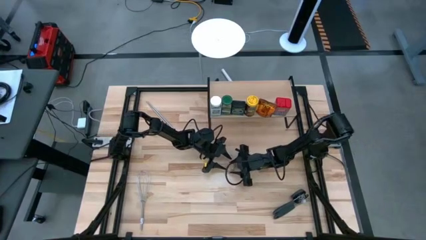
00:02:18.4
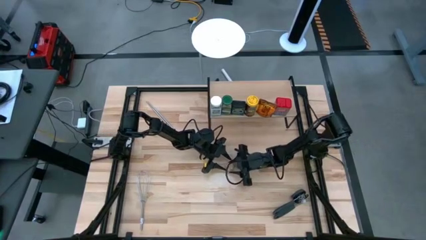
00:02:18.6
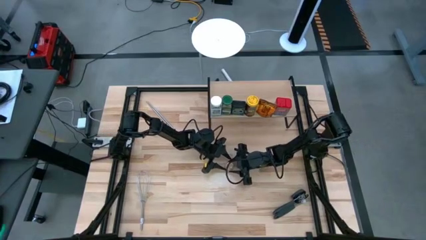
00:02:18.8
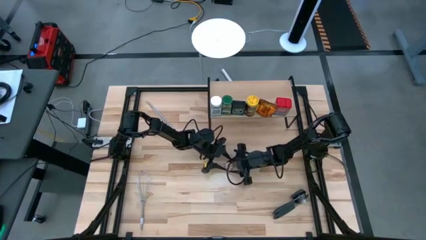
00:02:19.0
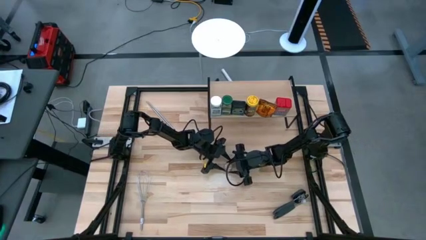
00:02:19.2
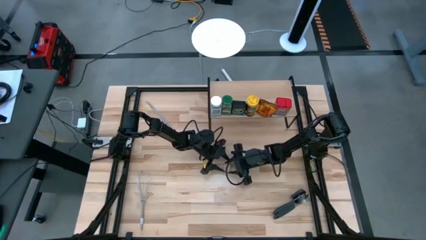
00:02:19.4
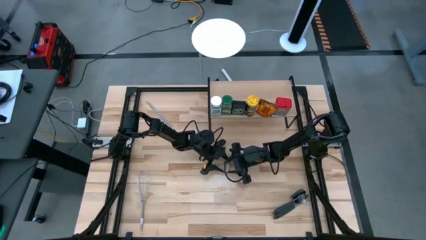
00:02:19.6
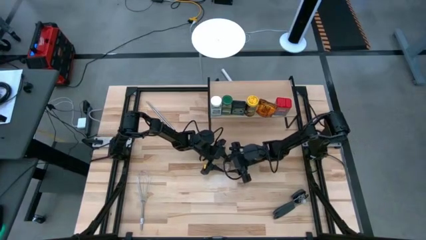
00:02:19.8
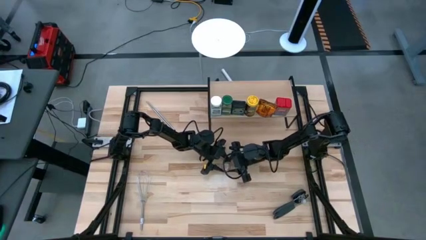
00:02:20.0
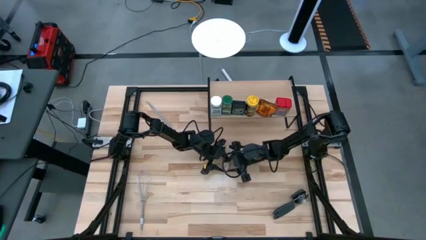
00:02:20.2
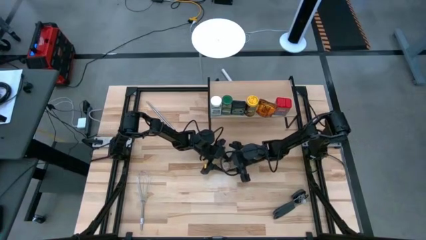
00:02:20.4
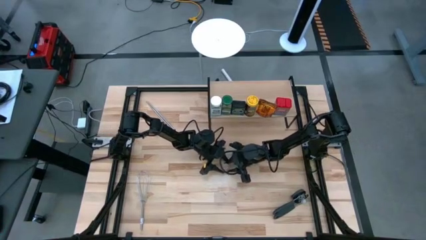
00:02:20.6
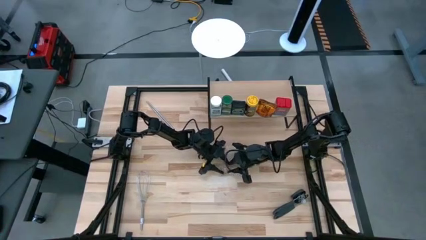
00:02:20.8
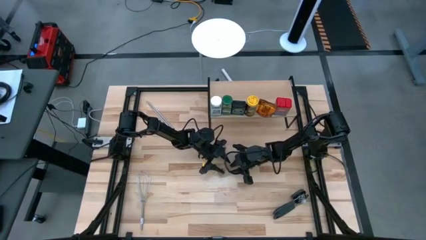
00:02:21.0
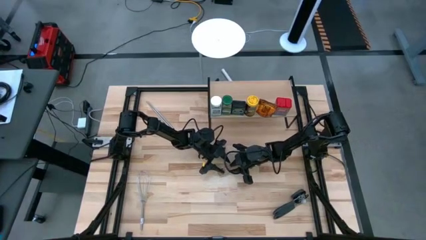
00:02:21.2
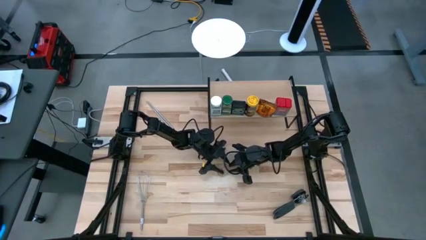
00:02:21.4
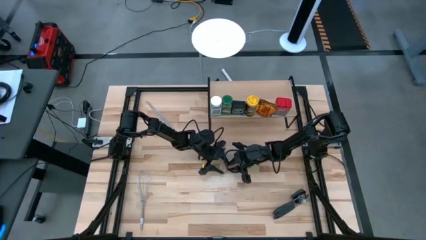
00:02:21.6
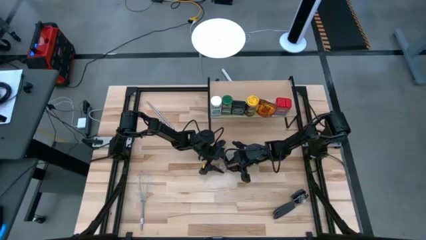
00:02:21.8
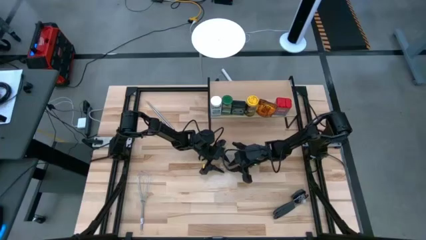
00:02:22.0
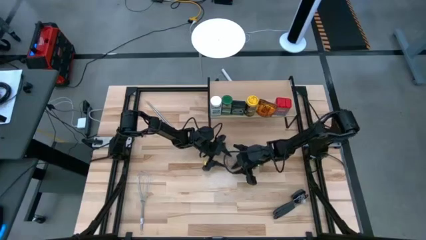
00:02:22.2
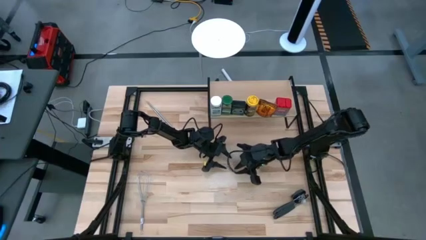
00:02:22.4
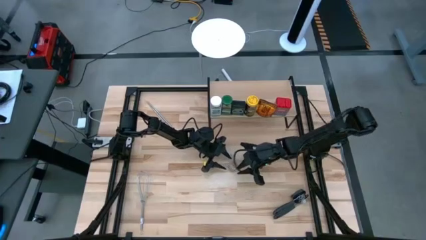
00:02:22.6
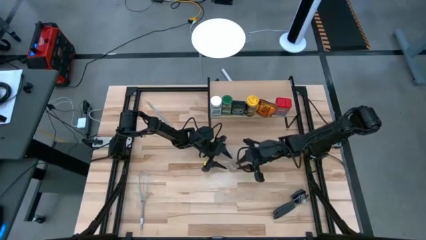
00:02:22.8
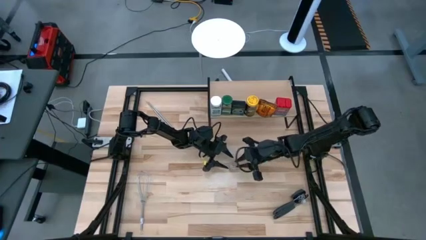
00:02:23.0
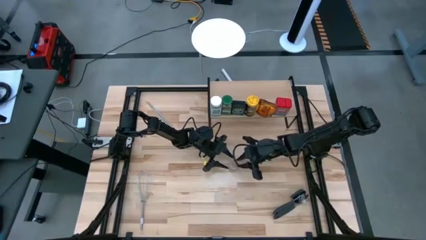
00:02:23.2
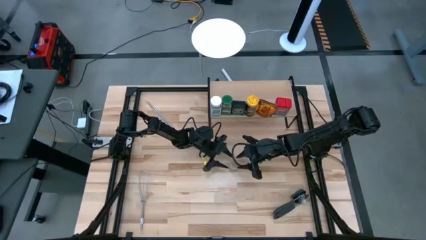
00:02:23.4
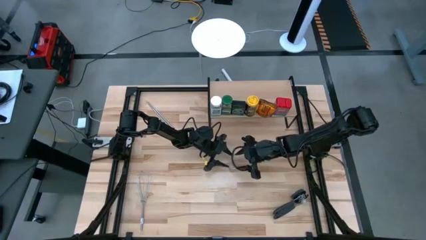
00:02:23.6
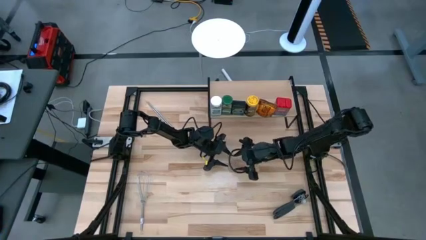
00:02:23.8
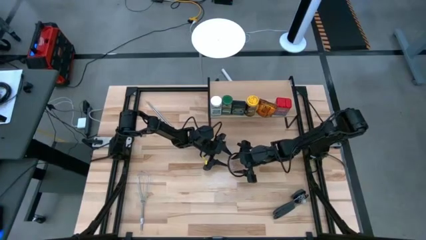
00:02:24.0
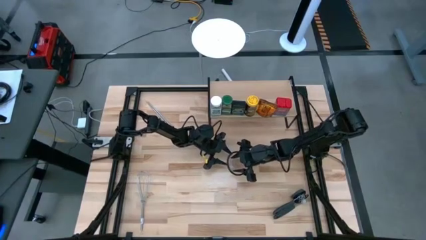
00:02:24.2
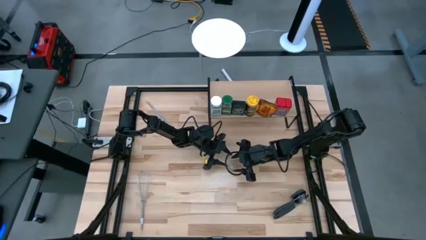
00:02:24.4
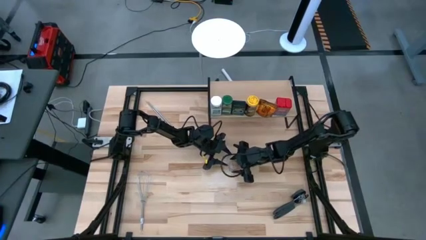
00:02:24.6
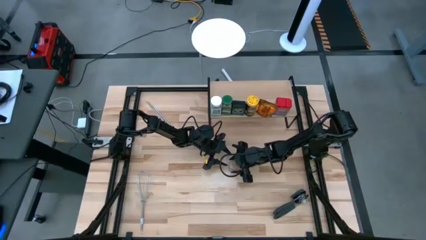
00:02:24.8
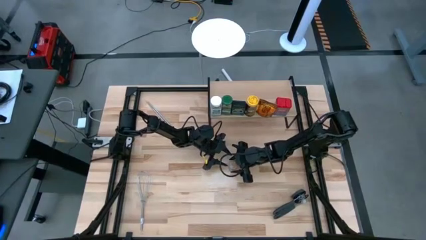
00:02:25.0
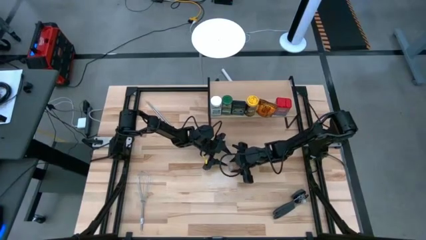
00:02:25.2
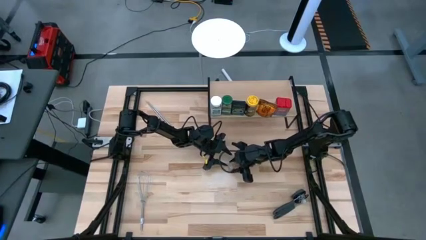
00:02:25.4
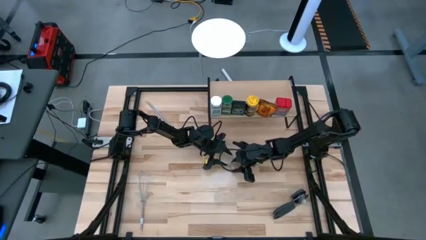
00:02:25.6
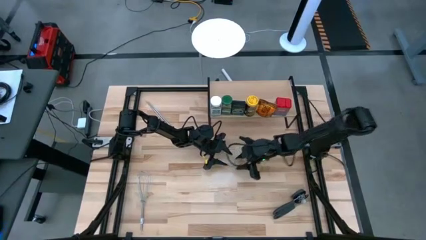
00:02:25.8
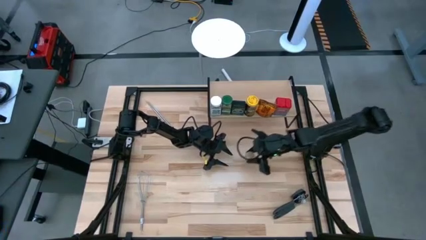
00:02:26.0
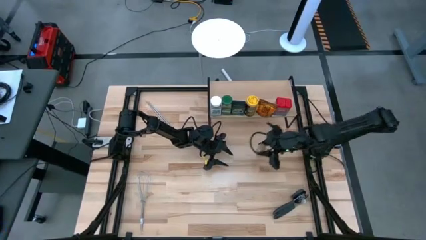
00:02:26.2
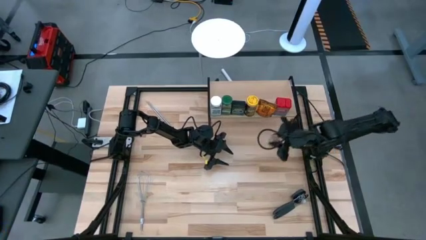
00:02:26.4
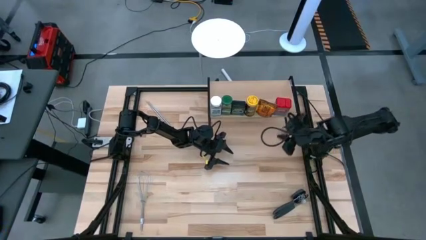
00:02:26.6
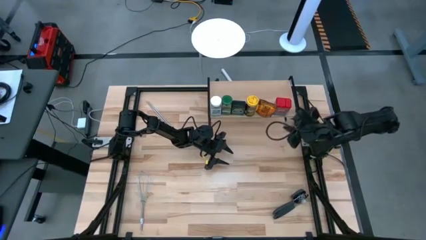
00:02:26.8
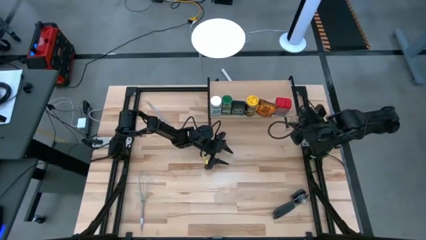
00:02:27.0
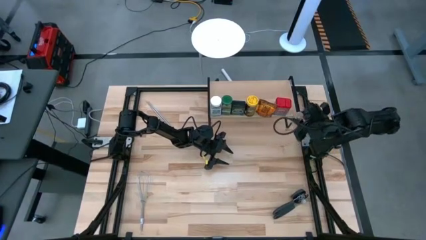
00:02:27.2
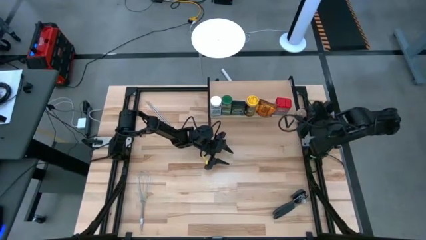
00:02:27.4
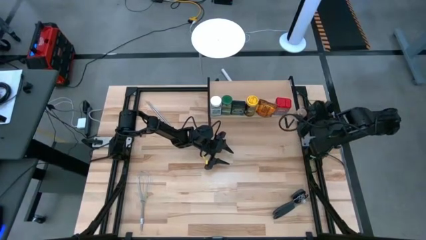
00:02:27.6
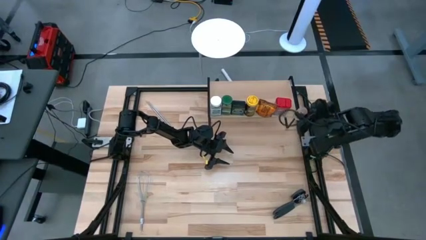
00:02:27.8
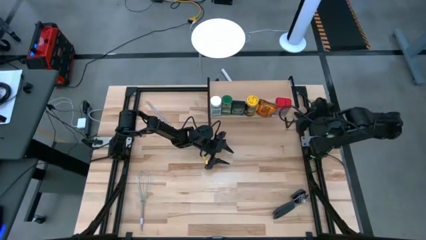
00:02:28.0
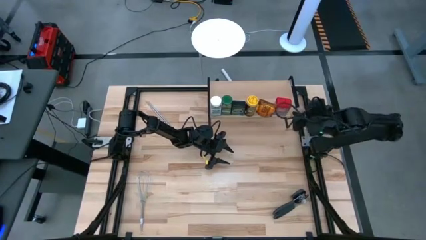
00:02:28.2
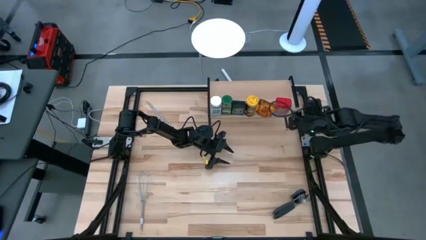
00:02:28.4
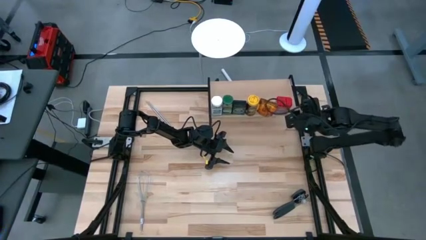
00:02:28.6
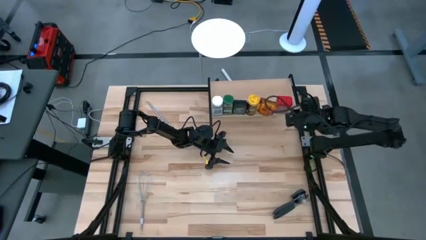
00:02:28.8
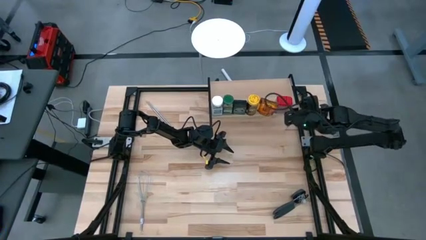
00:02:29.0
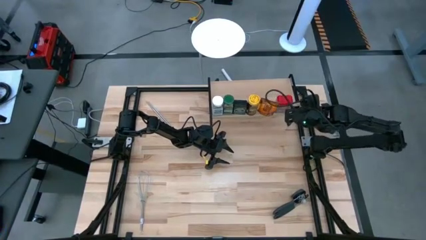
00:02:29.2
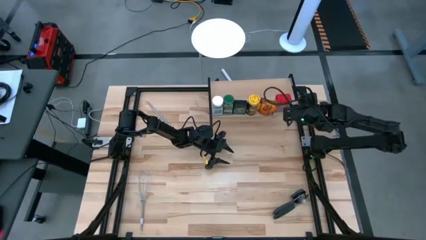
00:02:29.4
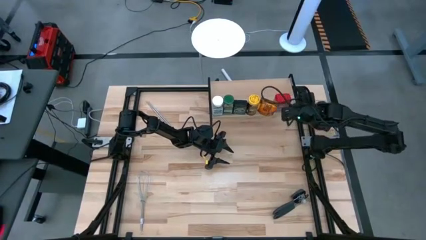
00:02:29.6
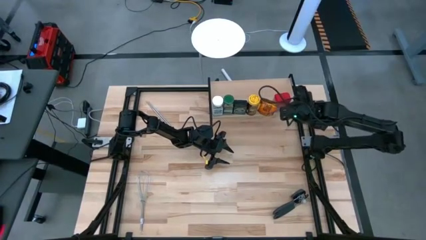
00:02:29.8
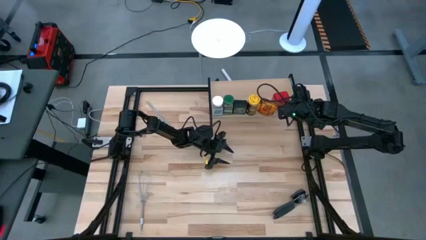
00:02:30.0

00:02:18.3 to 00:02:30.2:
Task: Shelf spices
Put the transparent seasoning bottle on the shelf

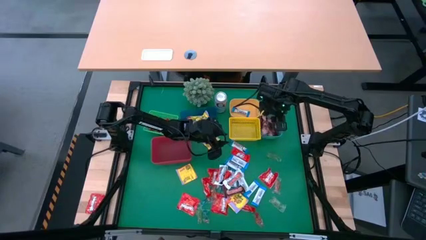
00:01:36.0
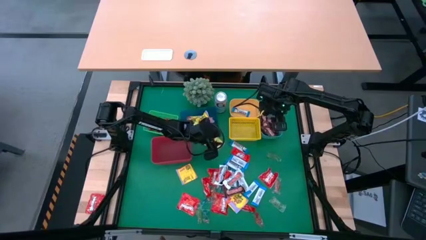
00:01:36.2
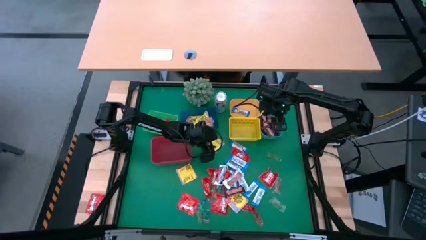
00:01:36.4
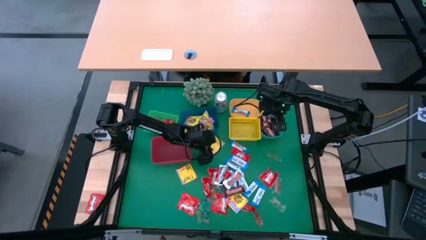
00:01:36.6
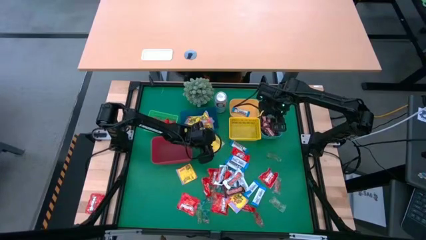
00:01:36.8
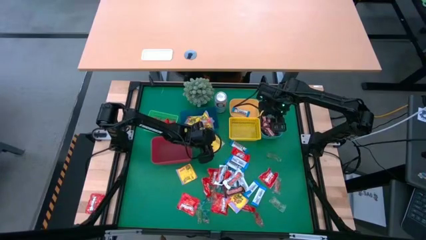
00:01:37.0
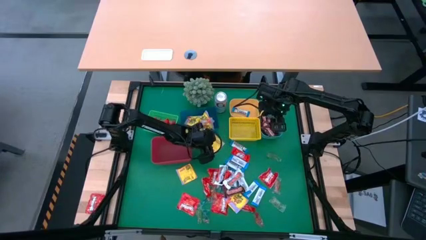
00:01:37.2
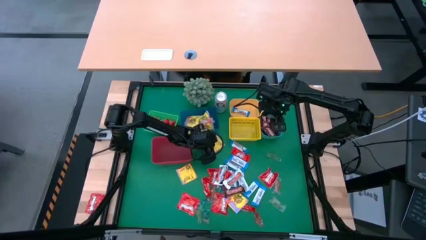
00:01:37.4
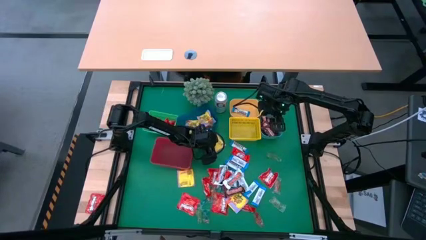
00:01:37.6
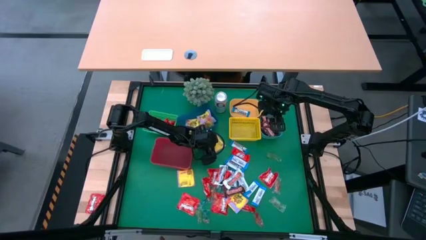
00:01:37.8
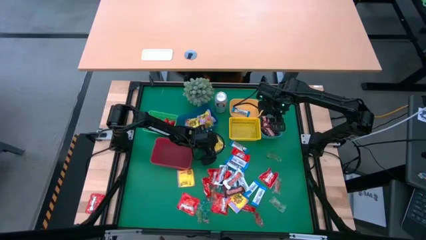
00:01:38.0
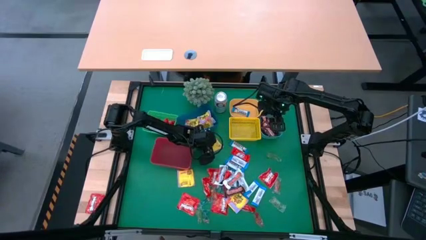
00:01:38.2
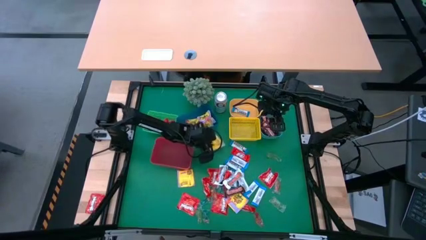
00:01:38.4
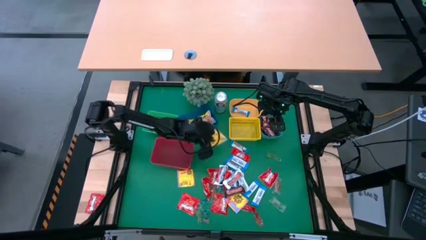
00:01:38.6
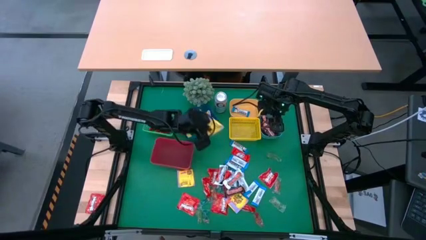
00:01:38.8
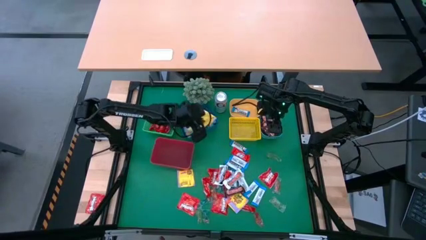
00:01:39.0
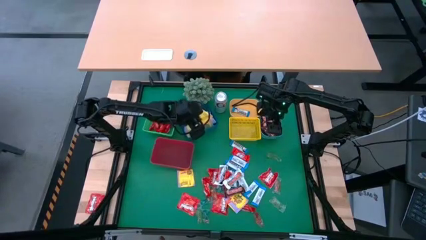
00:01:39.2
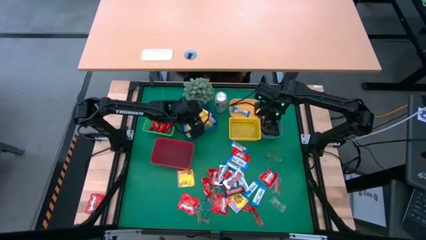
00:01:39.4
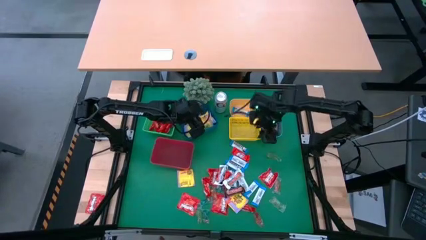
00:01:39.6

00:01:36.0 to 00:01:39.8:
Task: Sort candy
Put the yellow candy pack into the blue bin
